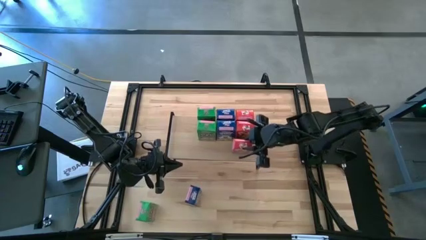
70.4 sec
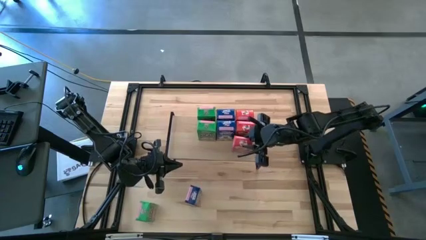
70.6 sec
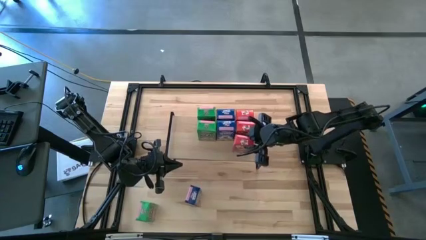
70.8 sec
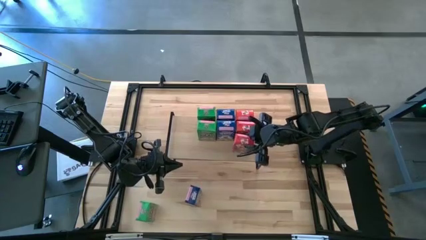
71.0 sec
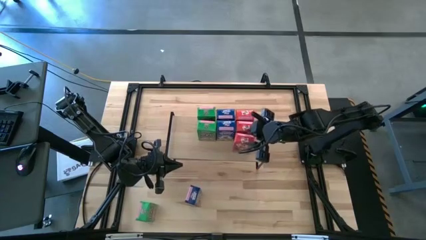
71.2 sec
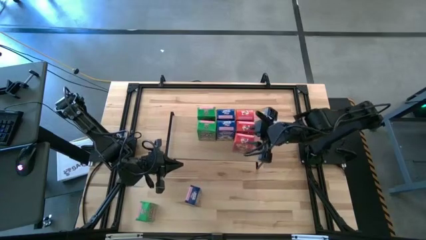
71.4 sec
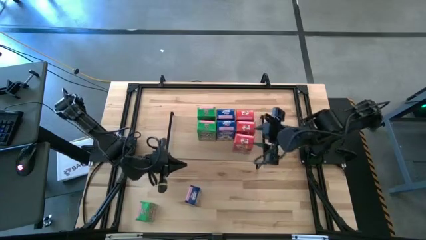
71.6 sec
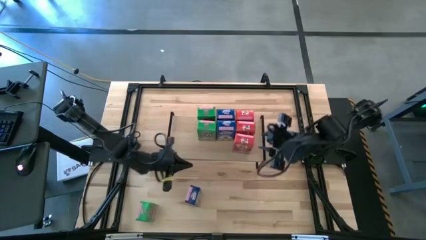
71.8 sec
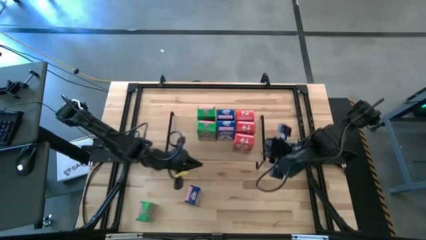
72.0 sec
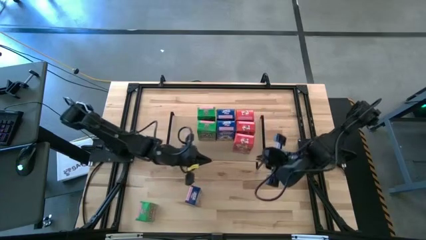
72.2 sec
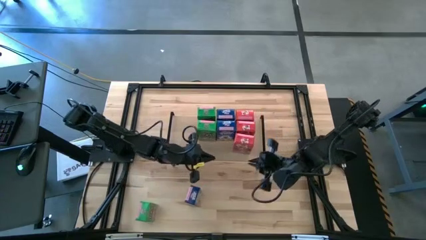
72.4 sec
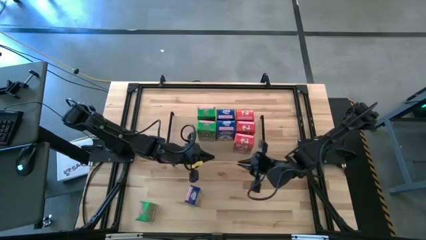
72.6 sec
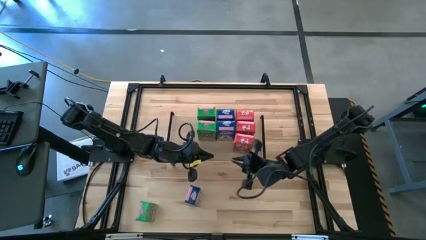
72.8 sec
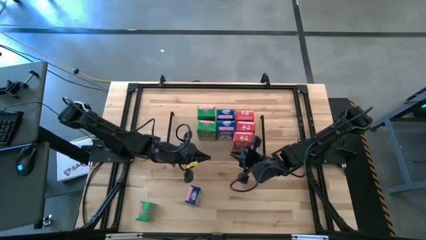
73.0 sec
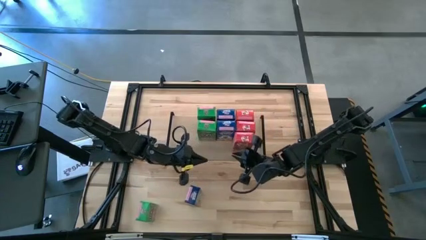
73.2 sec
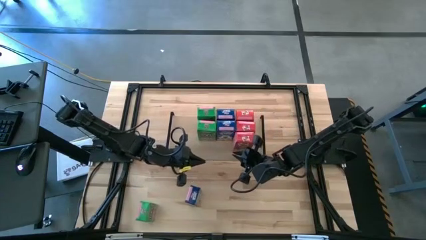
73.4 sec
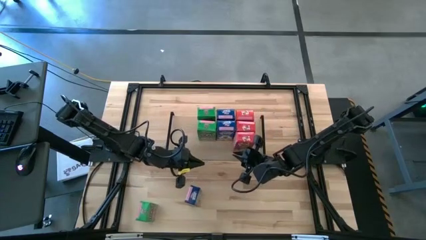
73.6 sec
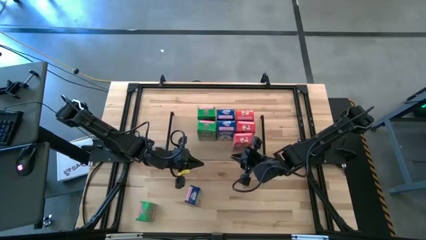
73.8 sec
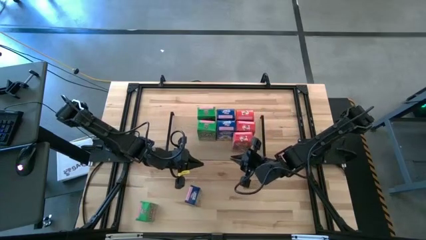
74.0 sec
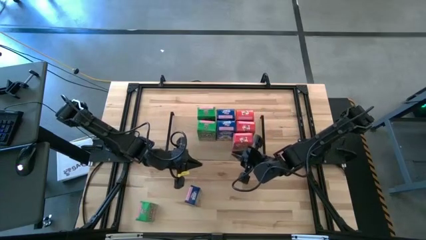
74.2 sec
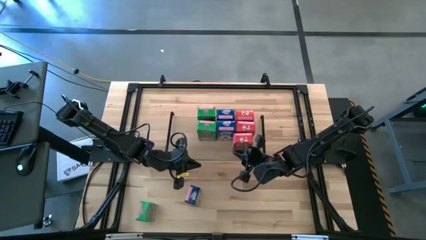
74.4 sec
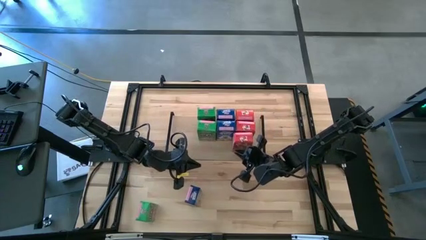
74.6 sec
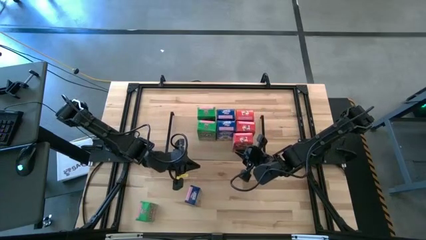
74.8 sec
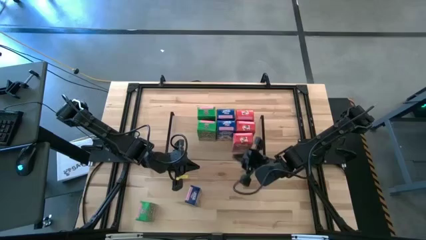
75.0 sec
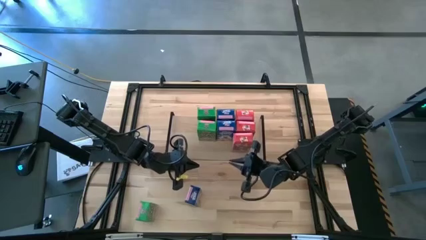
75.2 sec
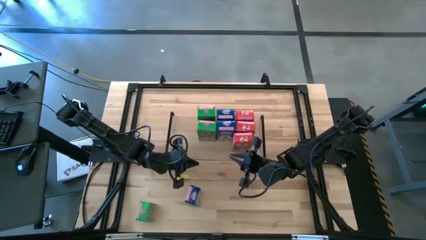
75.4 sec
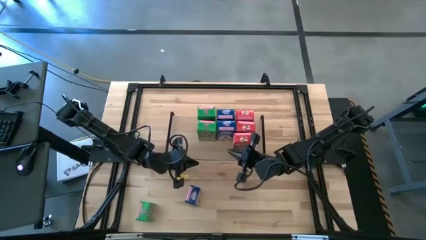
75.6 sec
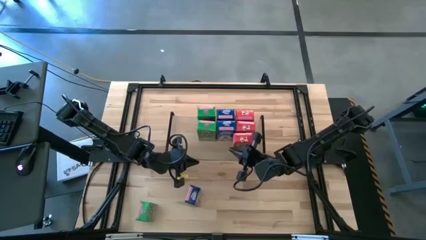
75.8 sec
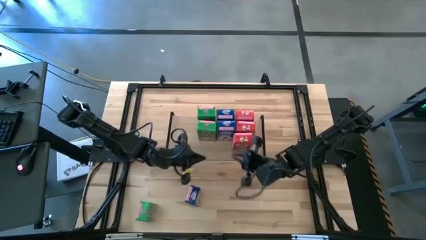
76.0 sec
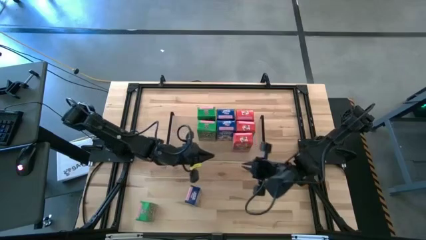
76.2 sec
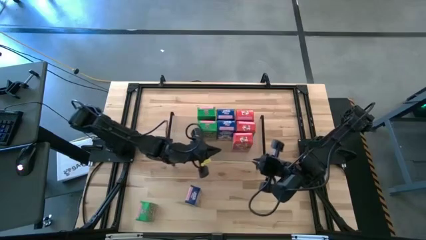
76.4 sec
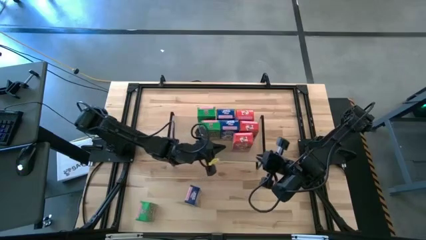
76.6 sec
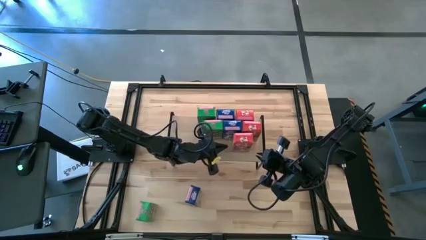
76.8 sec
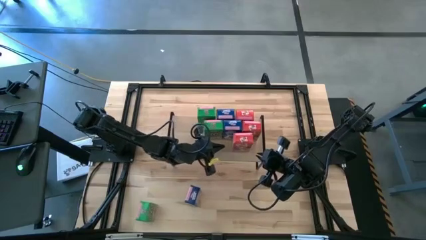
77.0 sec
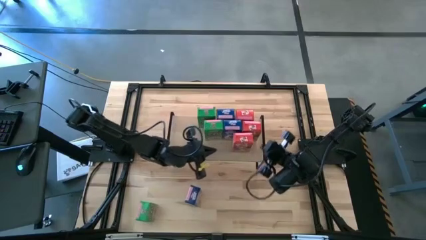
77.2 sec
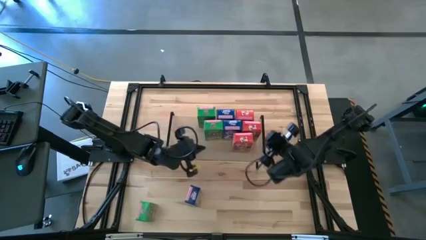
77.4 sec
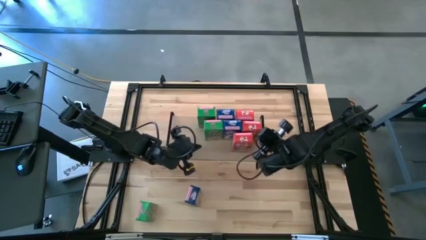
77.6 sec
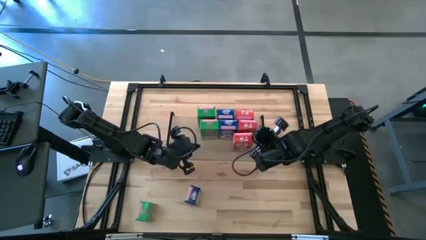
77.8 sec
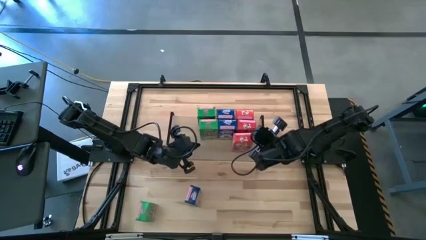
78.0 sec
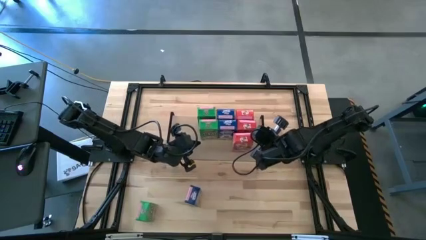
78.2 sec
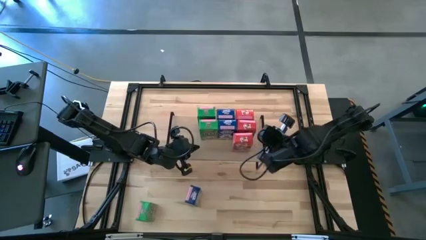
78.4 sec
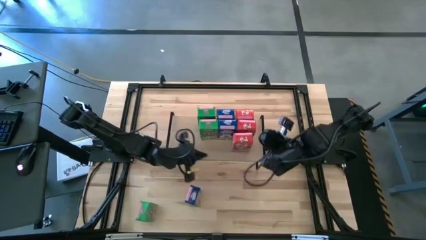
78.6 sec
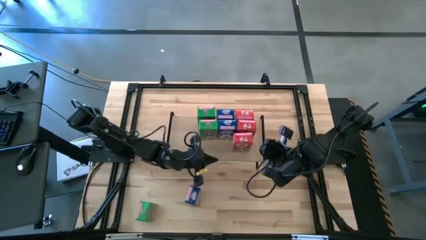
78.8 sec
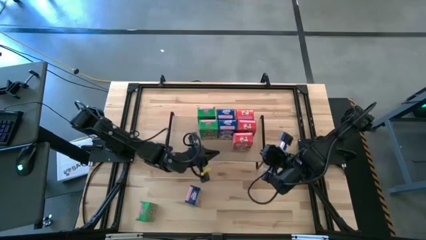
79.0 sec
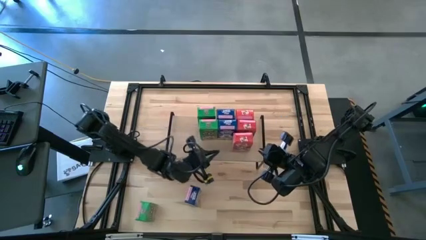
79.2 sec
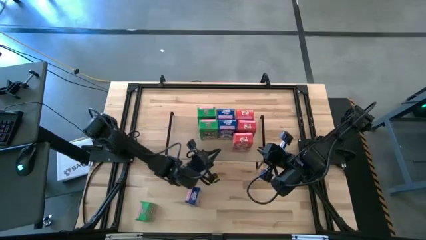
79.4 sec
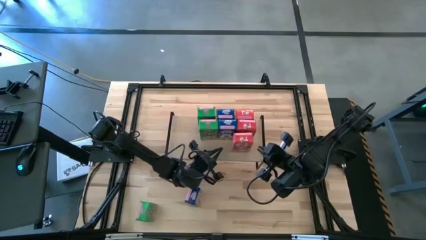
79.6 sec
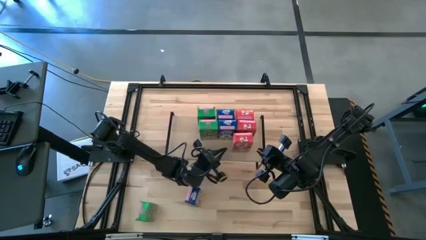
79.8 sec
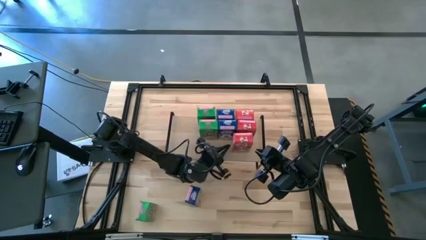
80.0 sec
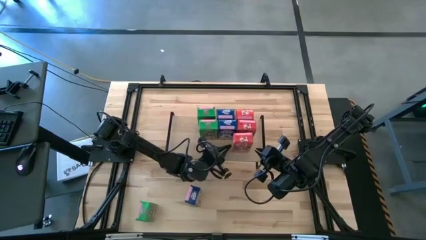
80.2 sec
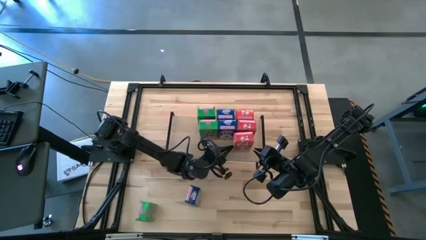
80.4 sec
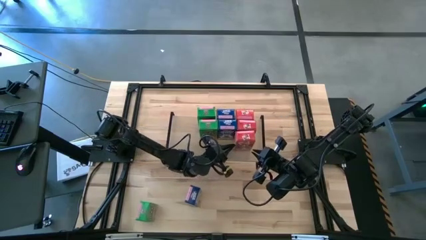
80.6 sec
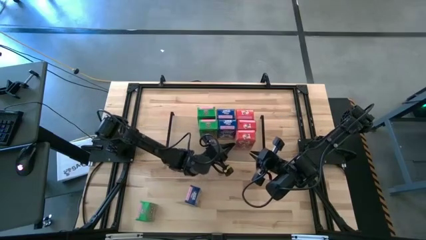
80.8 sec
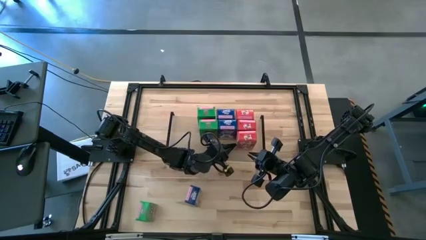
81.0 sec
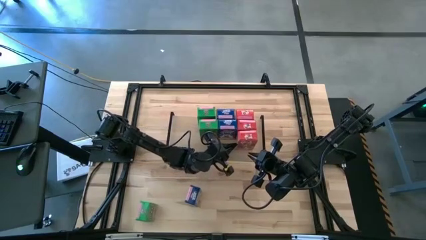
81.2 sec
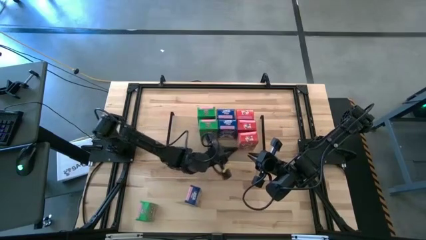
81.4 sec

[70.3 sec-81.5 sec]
Task: Stack cereal on shelf
Put the red cereal box on the shelf aligned with the other red cereal box
